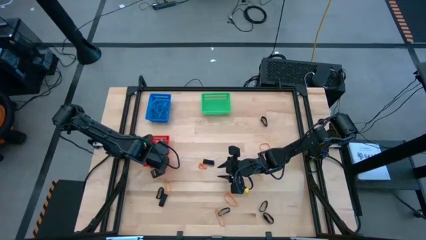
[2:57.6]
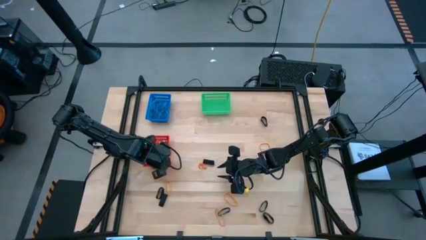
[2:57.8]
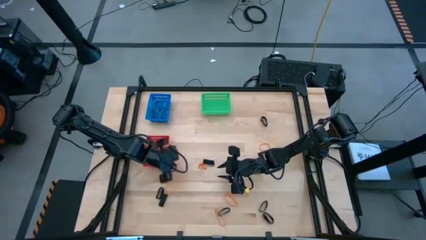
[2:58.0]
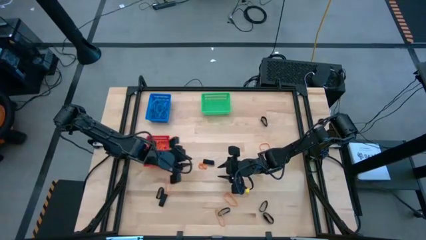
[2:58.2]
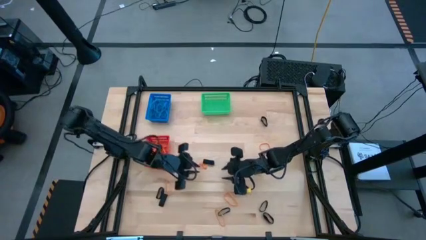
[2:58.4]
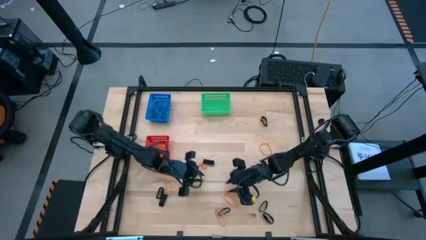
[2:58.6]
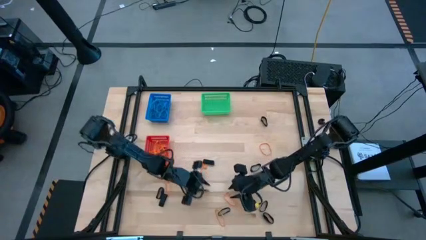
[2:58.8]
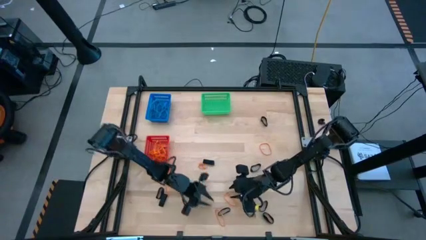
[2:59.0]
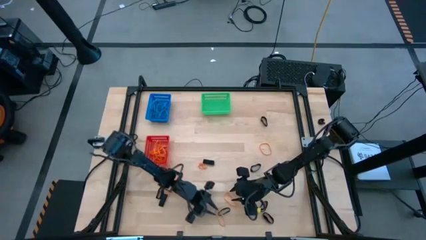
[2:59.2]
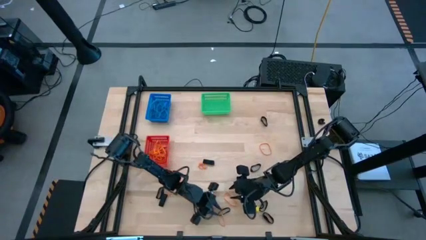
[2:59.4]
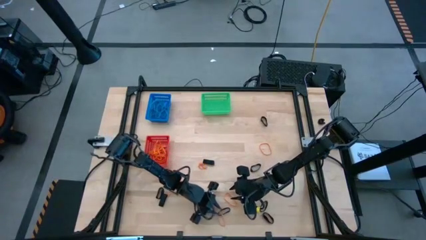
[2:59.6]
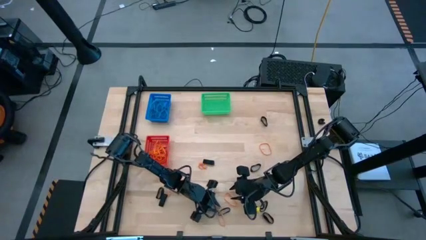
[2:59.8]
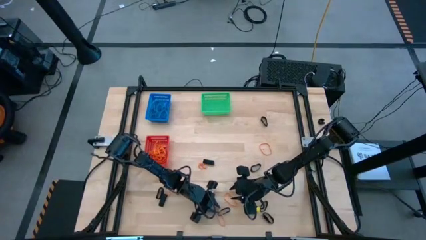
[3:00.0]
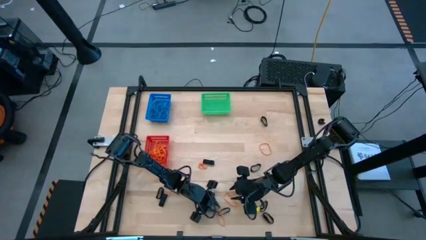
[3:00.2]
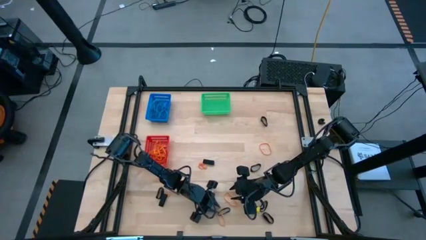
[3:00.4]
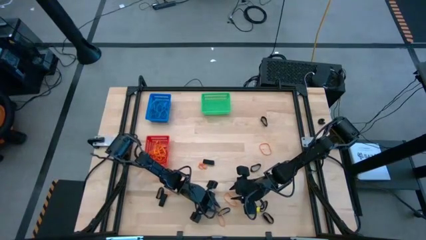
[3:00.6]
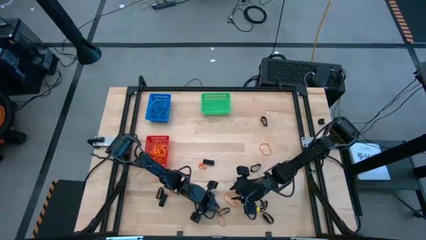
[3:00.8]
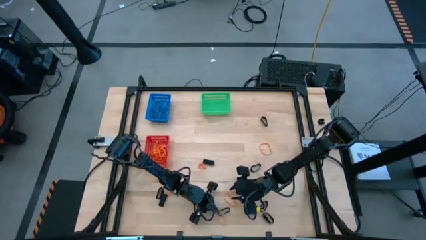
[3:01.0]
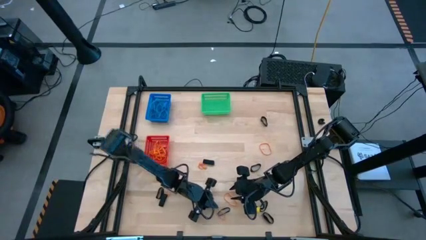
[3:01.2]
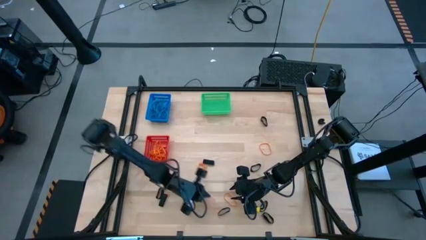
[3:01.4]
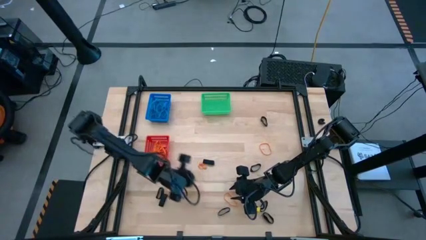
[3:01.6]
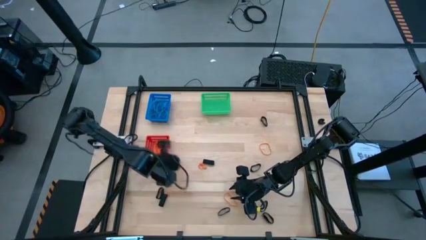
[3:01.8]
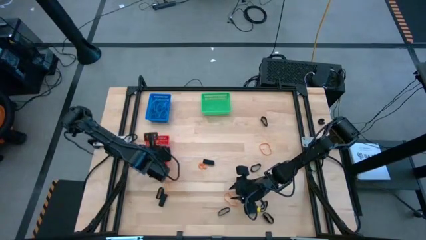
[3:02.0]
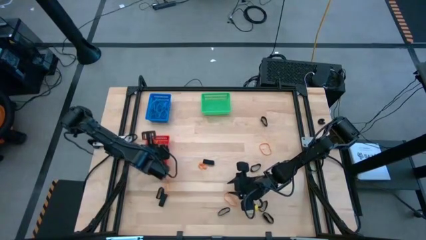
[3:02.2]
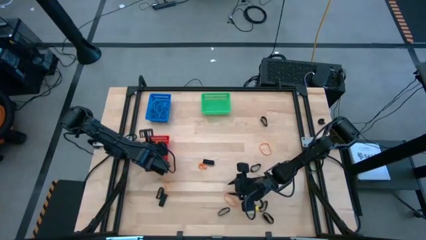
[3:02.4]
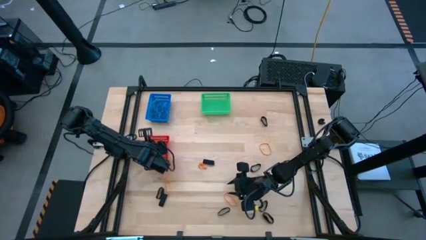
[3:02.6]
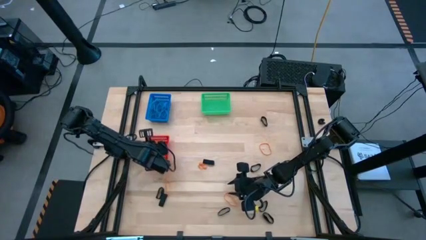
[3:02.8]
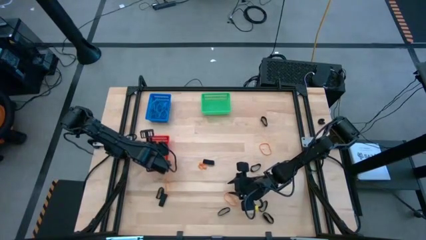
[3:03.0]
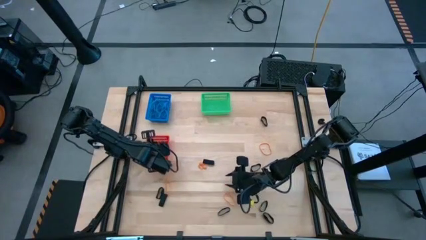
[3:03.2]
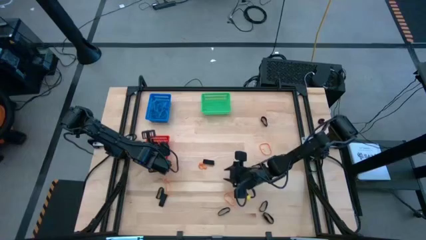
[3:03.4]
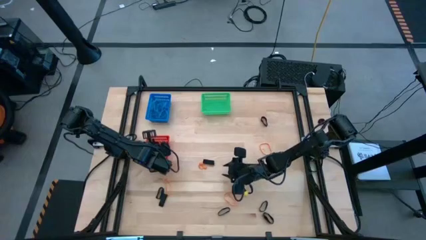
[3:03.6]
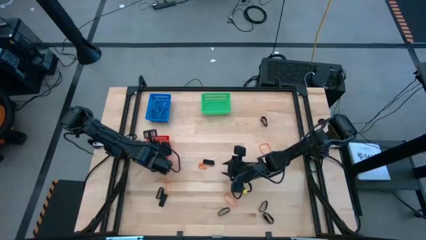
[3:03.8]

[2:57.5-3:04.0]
Task: Sort rubber bands into baskets
Put the orange rubber band into the red bin

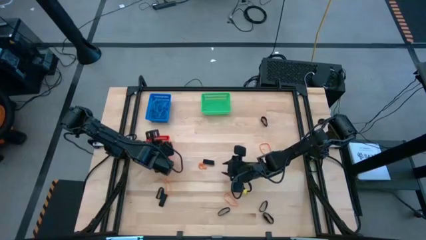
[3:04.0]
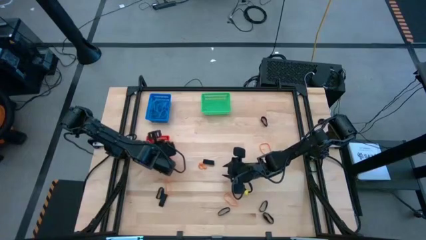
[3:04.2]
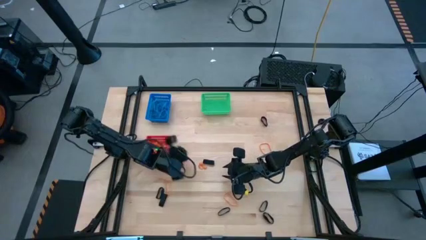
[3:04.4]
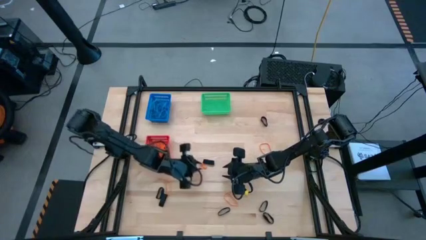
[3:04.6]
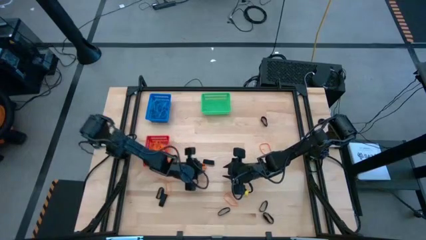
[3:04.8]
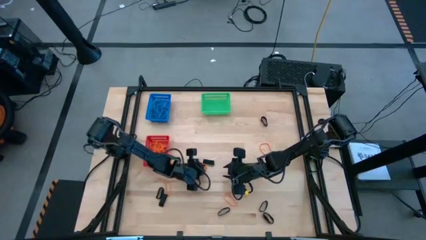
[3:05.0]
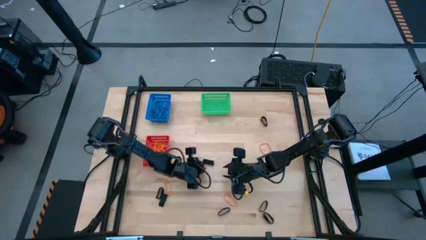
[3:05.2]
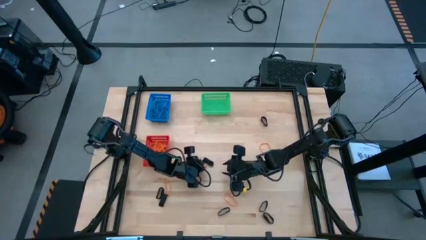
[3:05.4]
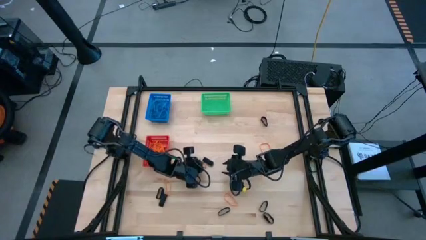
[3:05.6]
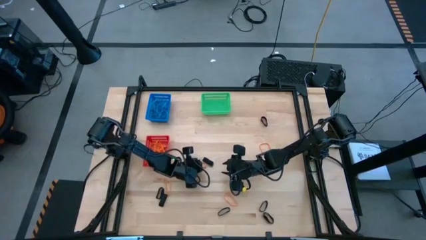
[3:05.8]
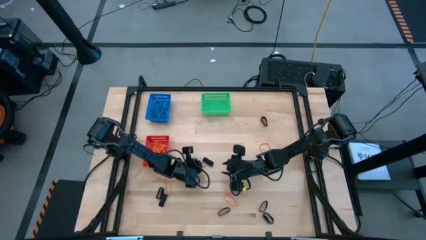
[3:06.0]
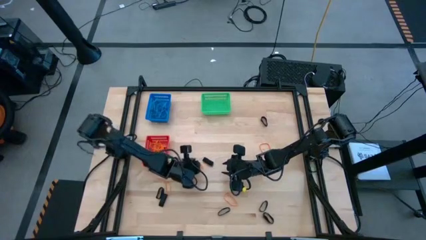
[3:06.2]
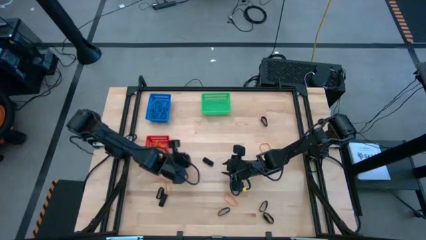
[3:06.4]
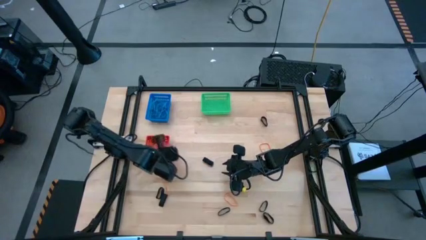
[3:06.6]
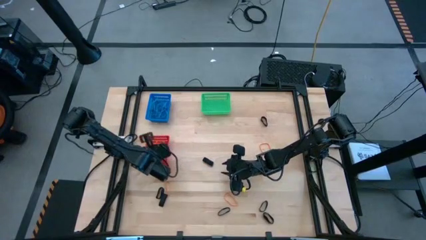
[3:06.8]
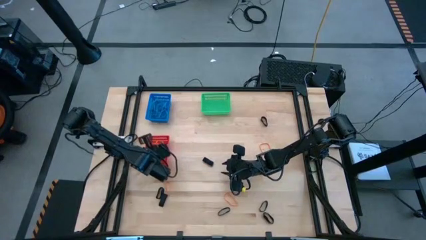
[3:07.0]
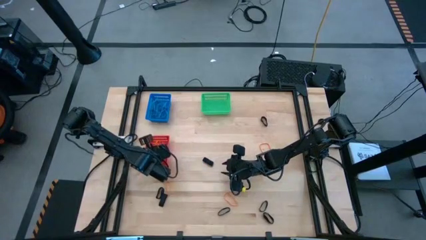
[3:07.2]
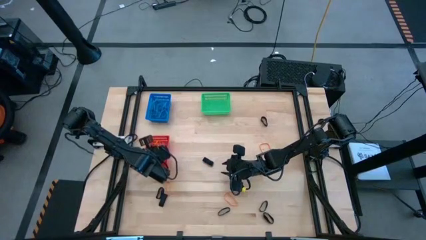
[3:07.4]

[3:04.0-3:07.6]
Put the orange rubber band into the red bin

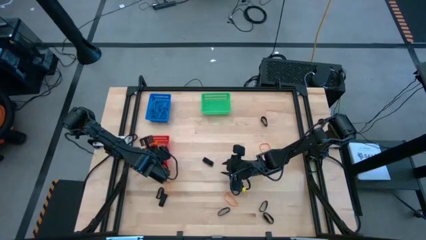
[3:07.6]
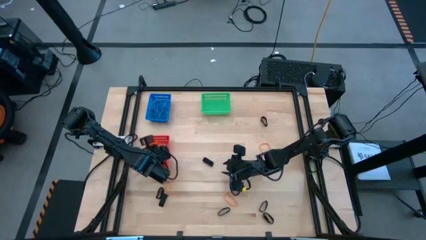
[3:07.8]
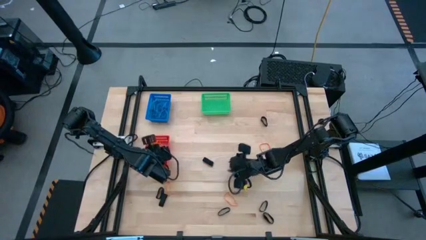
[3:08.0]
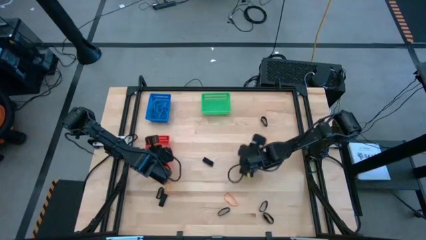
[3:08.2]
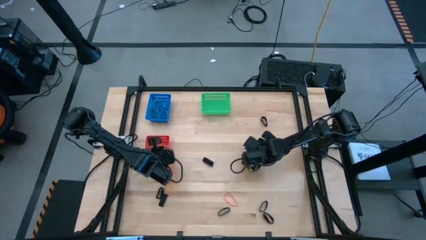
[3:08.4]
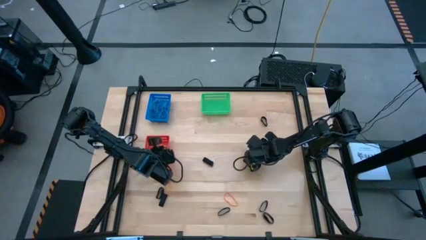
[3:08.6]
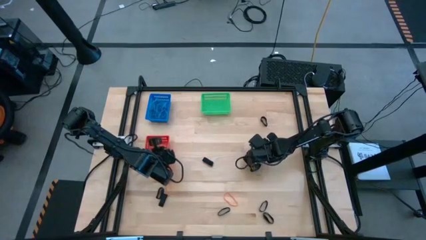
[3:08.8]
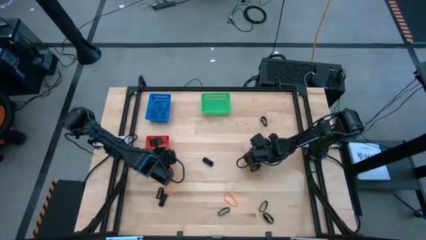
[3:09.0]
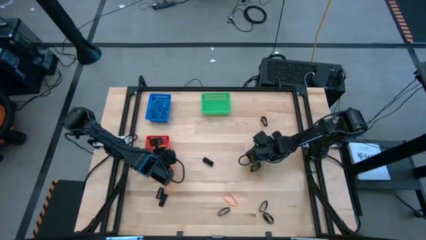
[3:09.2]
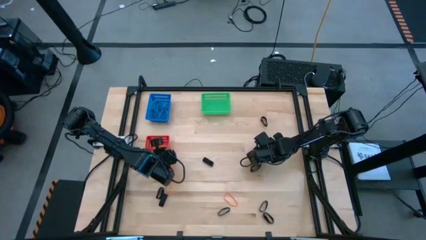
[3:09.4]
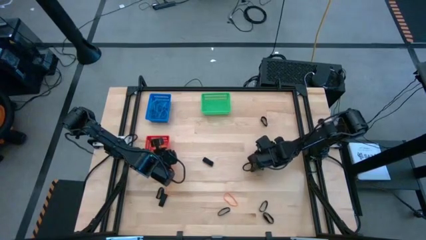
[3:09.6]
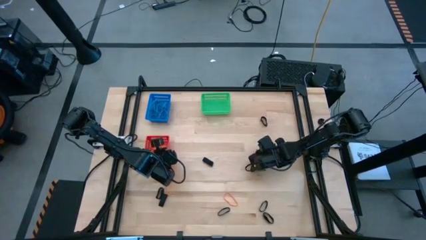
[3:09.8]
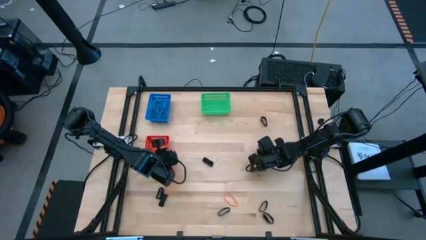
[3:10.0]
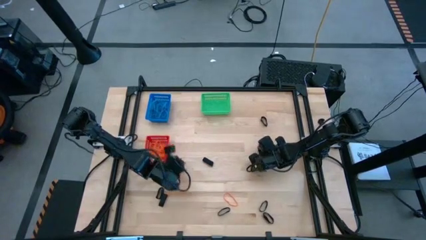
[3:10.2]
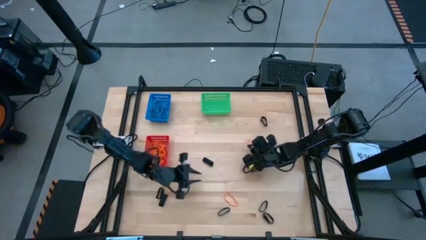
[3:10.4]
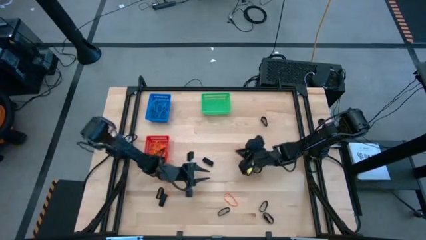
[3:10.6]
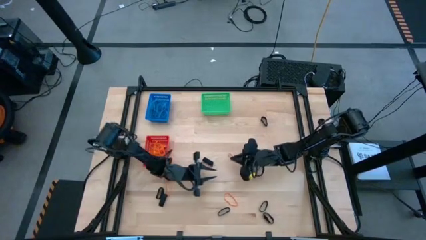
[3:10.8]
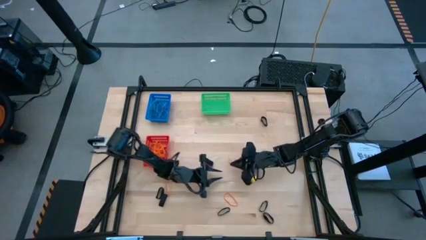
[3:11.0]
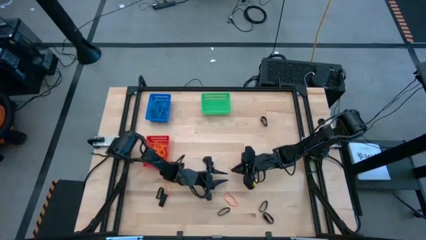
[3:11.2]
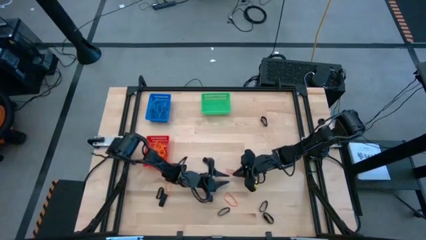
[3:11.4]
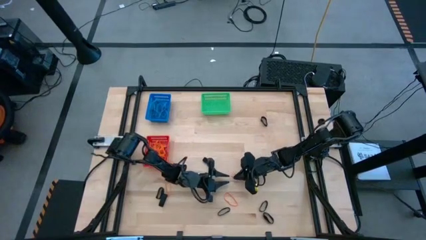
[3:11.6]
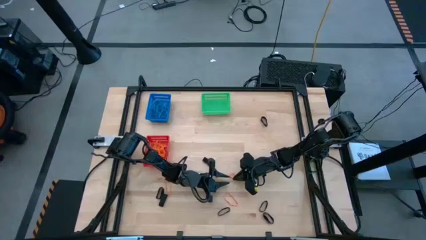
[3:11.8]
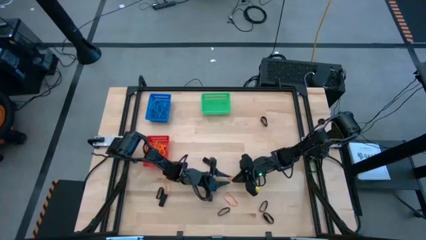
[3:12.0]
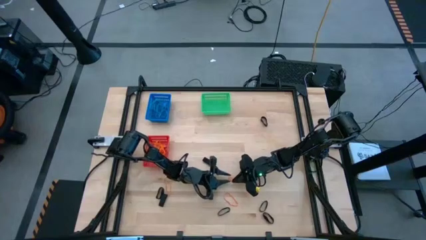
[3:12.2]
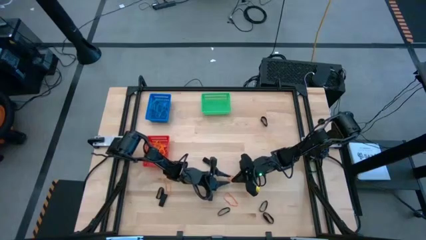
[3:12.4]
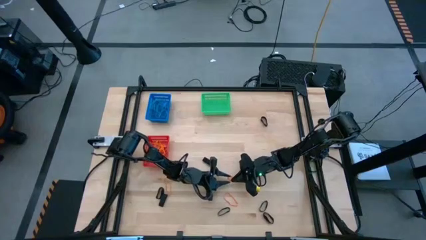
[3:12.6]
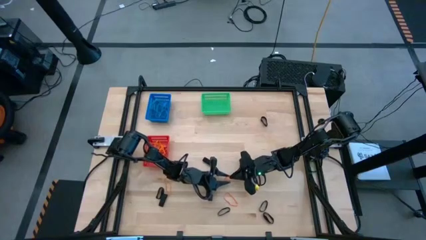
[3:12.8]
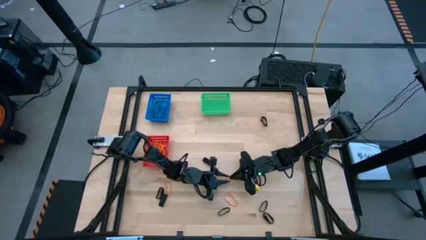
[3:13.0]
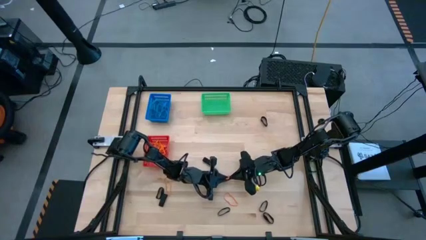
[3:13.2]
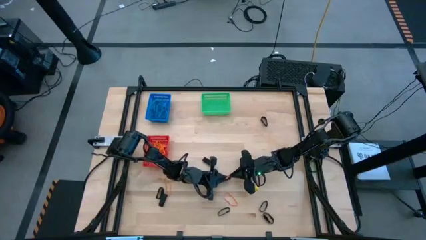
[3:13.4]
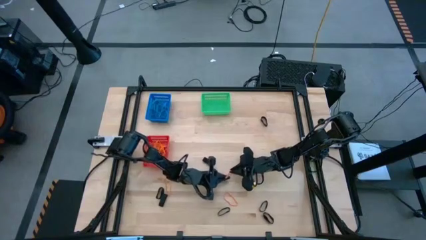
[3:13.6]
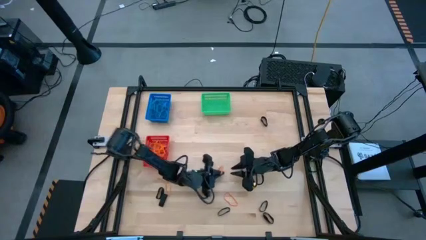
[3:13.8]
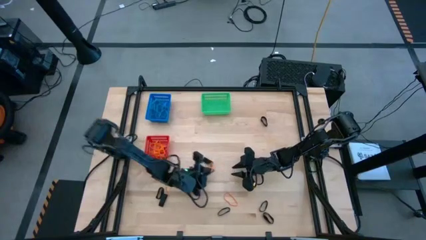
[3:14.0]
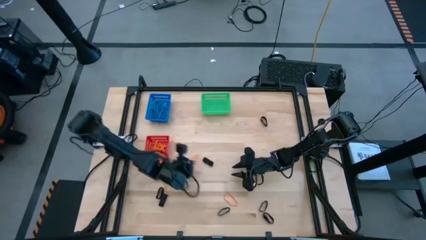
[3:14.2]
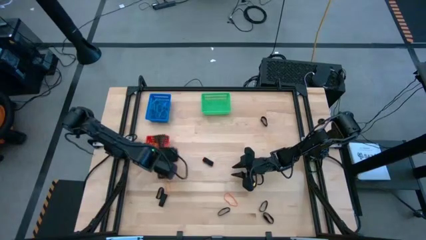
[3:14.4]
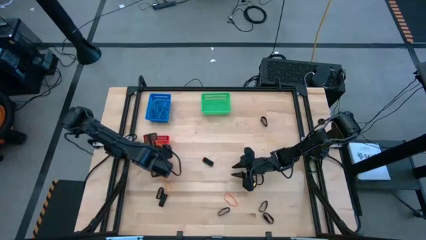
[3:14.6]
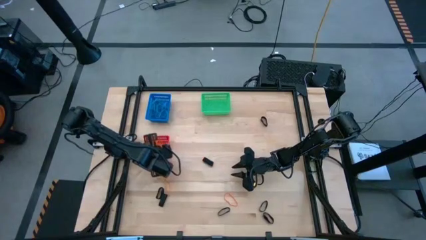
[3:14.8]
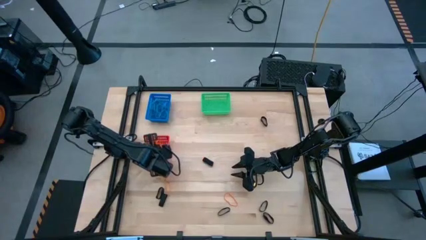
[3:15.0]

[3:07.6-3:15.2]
Put the orange rubber band into the red bin
